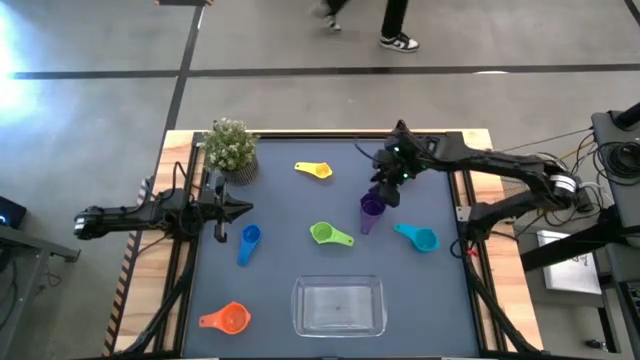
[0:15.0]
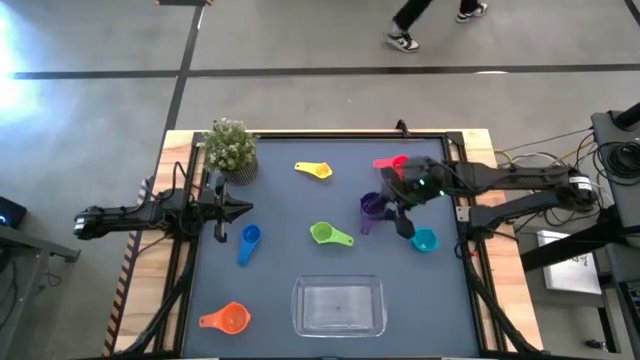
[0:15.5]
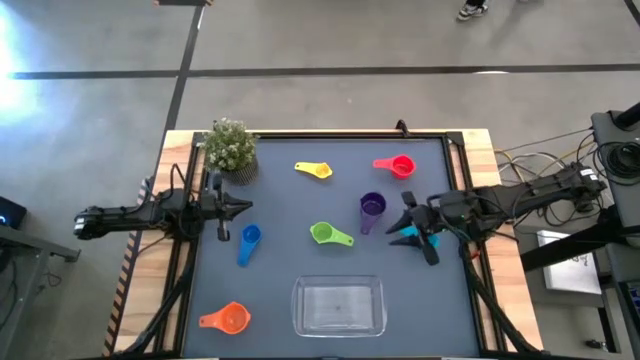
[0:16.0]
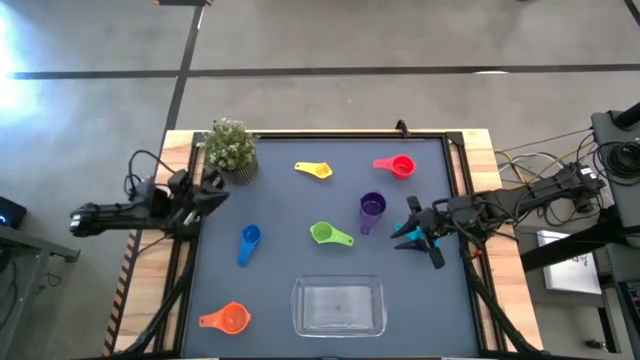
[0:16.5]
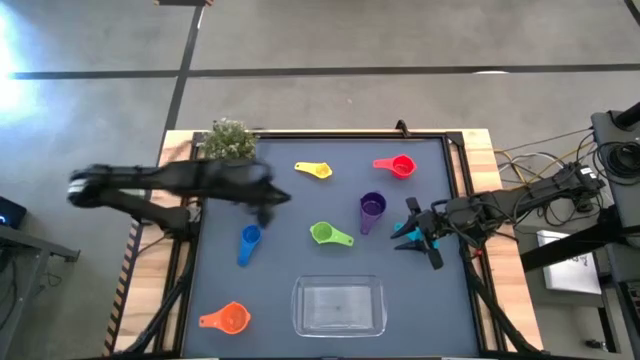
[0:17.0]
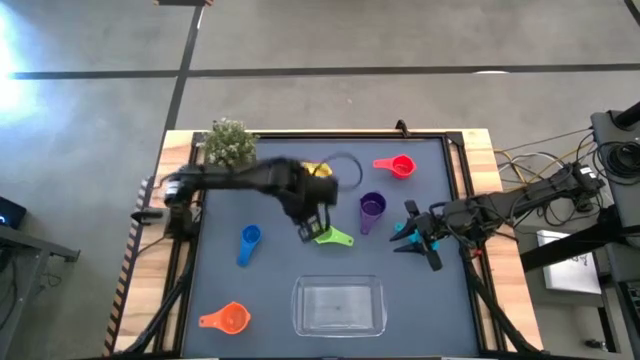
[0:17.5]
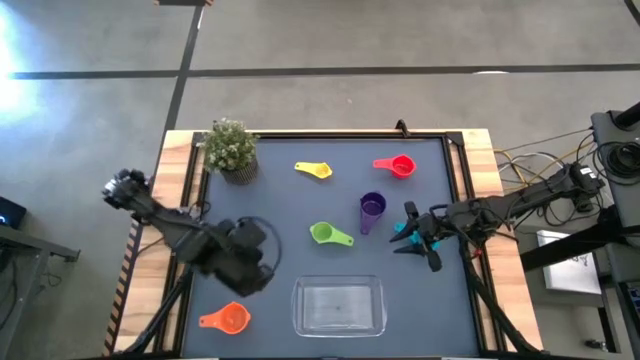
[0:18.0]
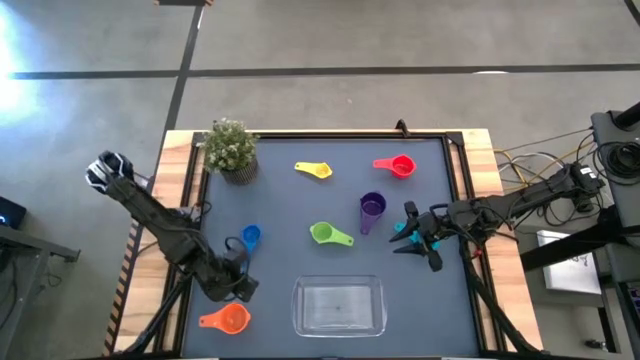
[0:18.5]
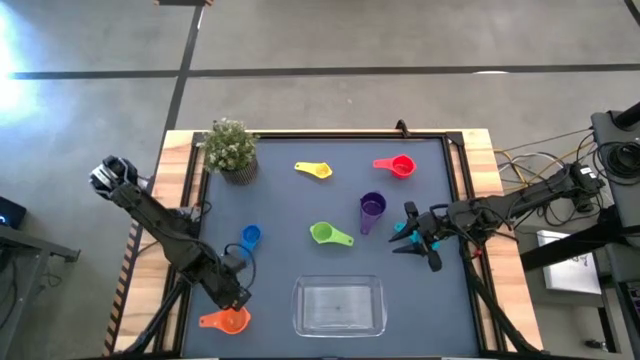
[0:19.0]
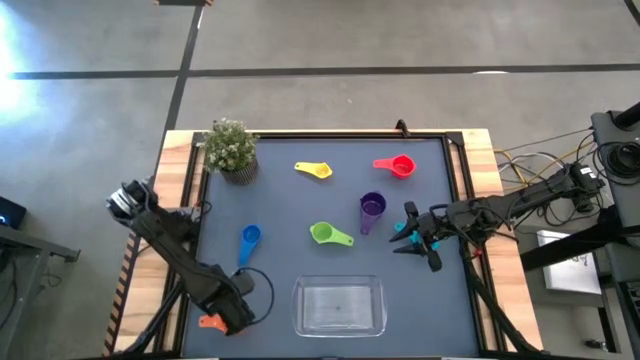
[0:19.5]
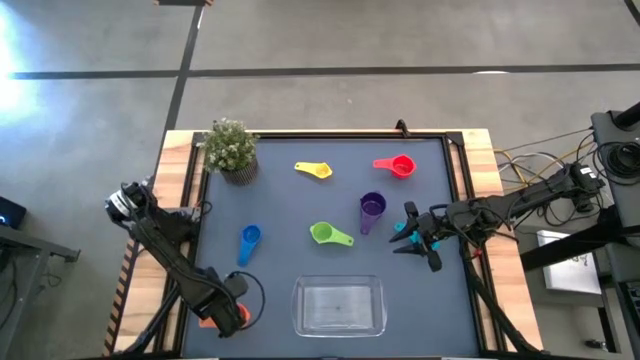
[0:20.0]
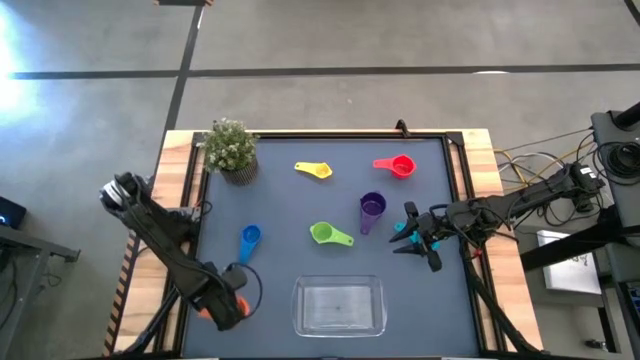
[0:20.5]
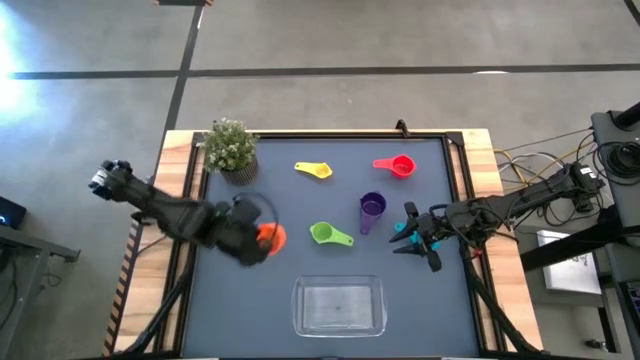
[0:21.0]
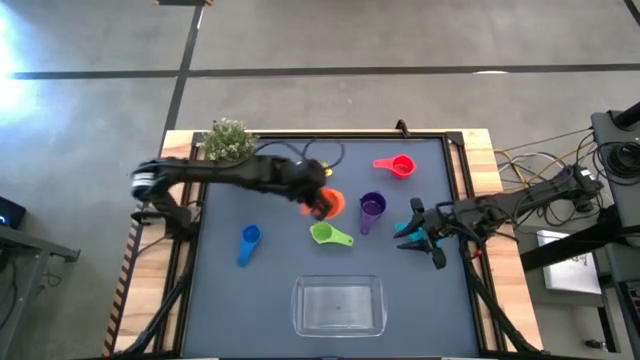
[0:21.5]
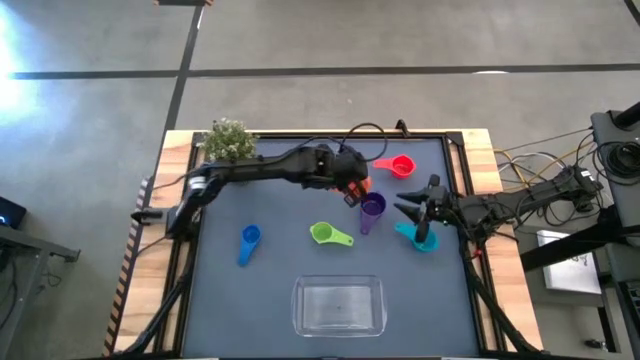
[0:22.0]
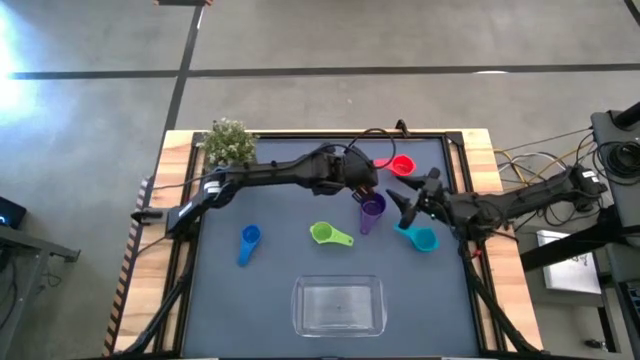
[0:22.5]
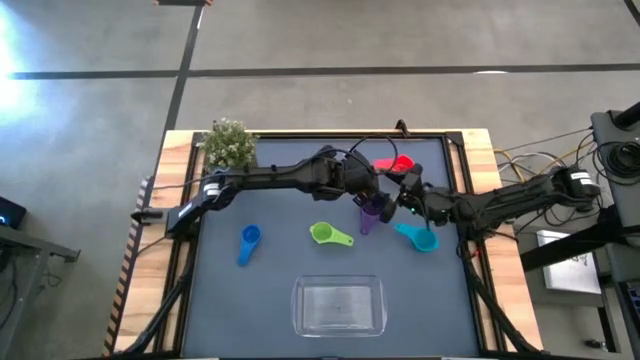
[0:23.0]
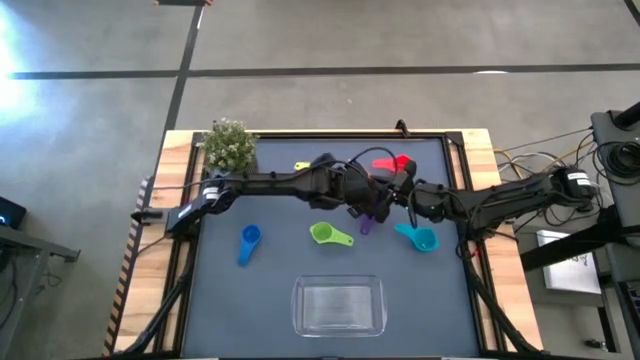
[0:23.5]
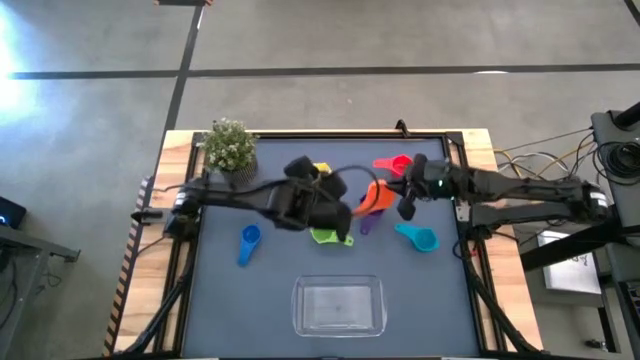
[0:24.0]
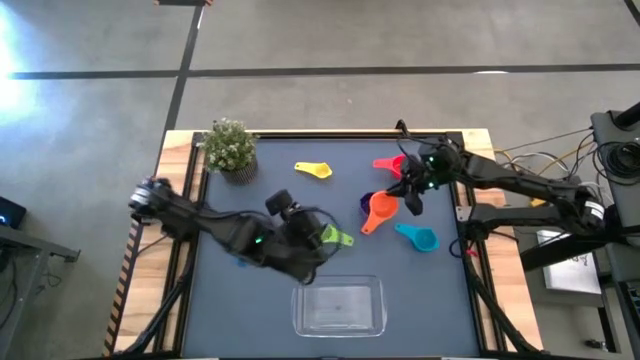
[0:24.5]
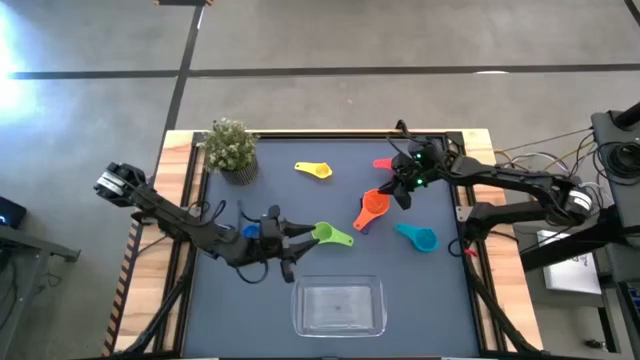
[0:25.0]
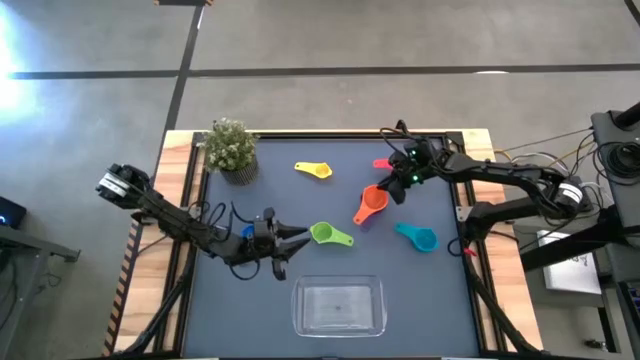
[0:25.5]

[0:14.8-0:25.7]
Task: Nest measuring cups in basket
Stack the orange measuring cup on the purple measuring cup

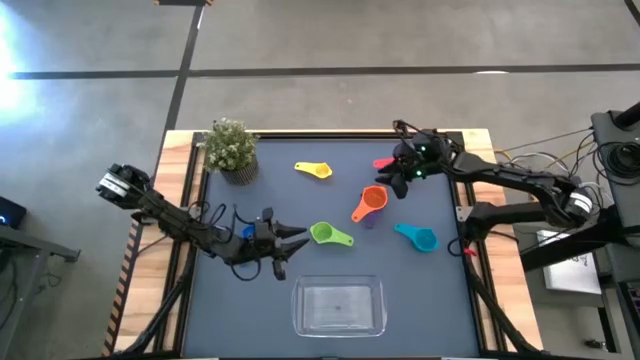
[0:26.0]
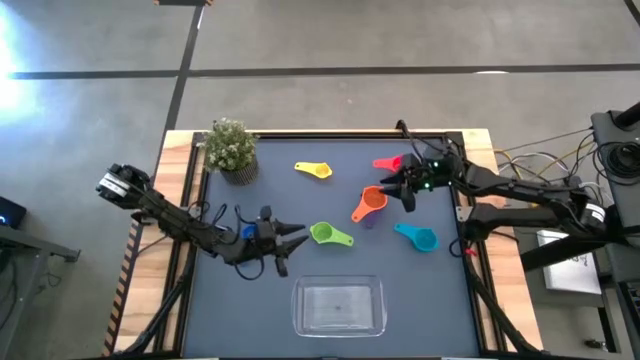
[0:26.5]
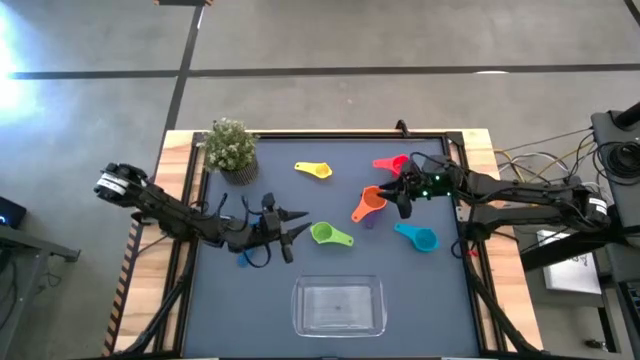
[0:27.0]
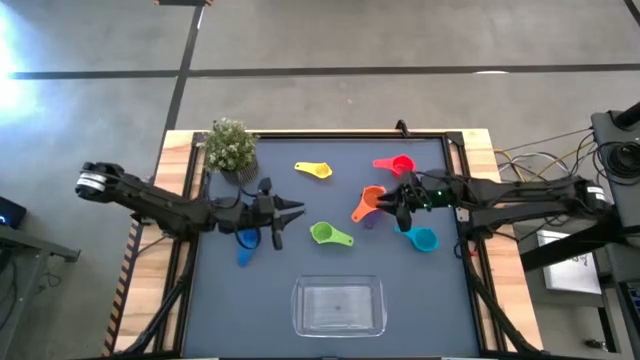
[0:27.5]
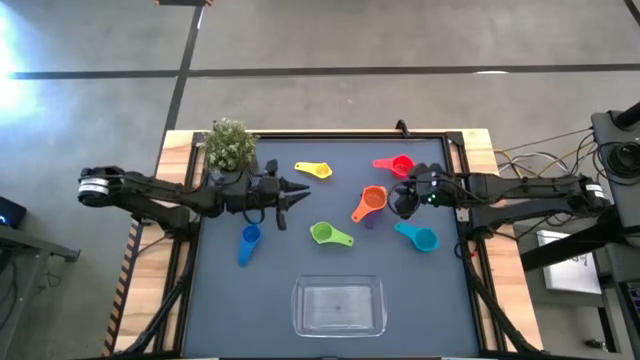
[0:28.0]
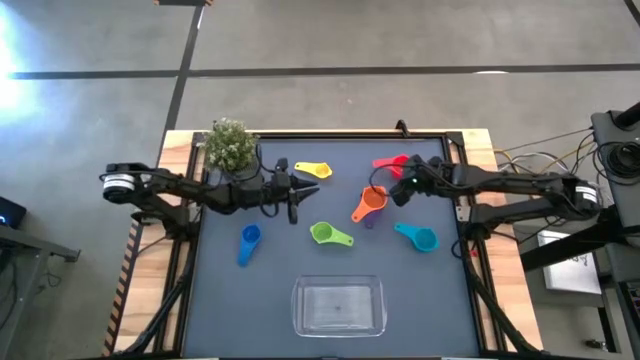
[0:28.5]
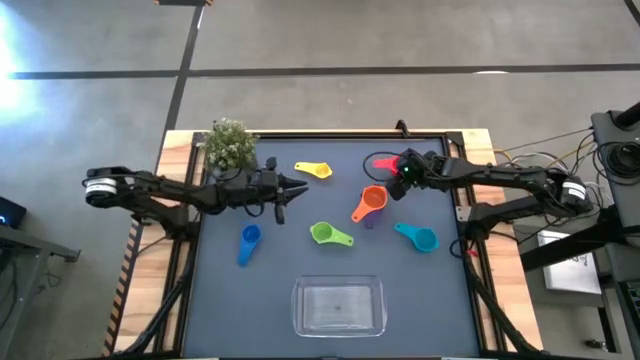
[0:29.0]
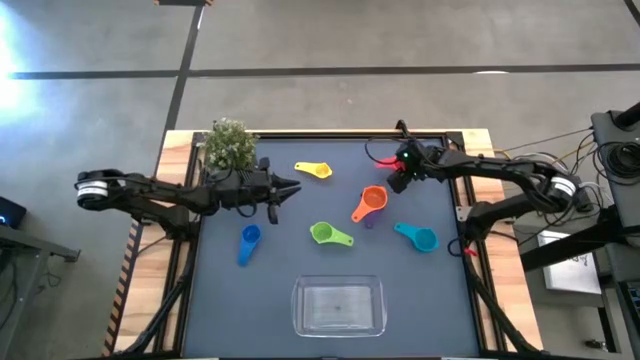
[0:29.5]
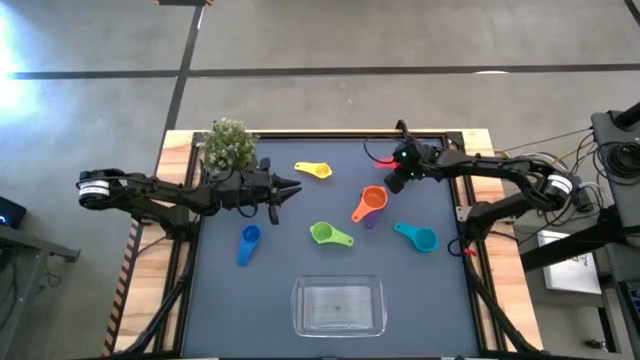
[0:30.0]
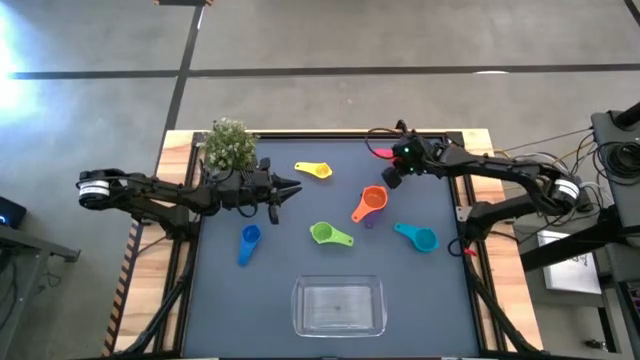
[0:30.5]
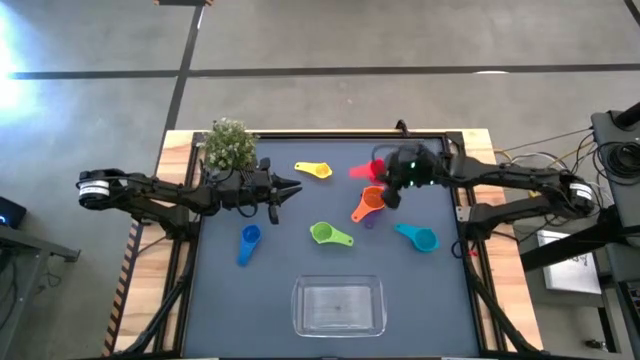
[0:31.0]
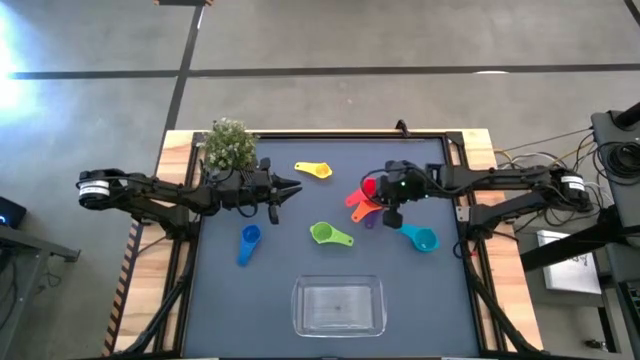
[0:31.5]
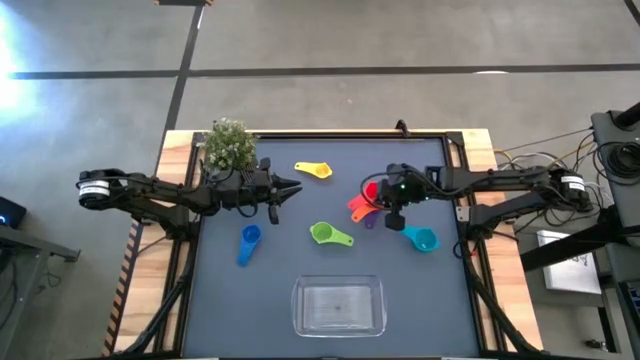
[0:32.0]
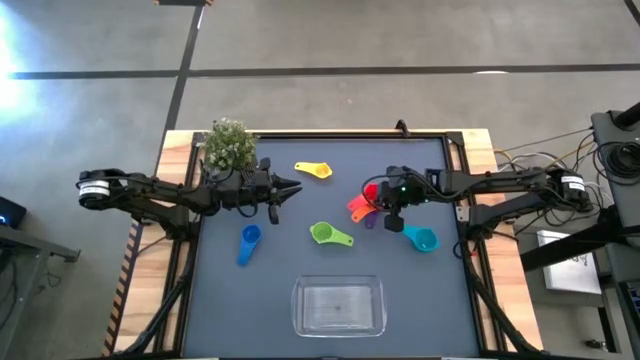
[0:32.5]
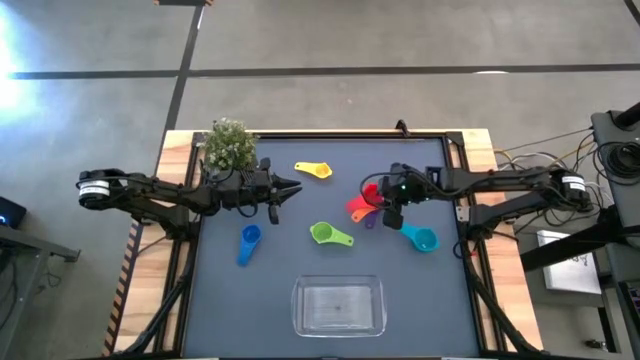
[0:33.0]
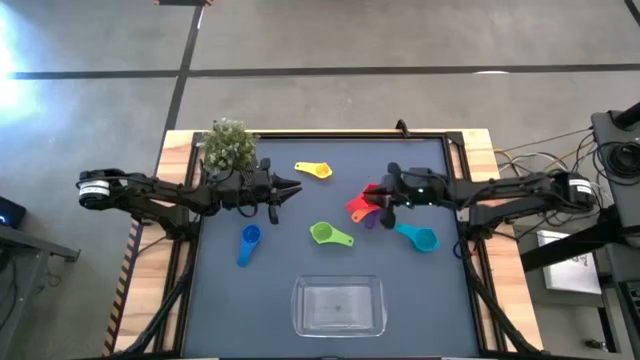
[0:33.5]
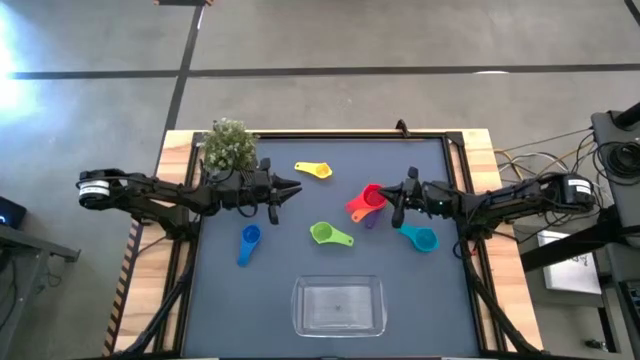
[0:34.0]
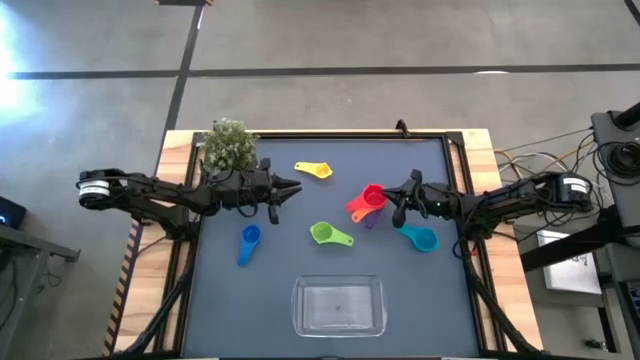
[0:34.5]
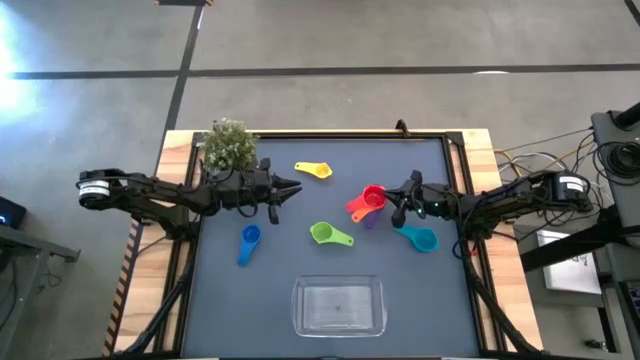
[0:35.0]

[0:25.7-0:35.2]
Stack the red measuring cup on the orange measuring cup
